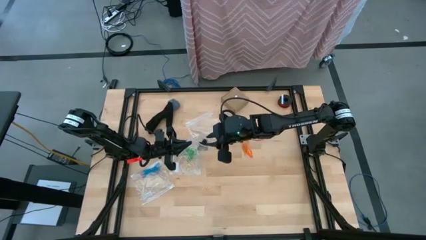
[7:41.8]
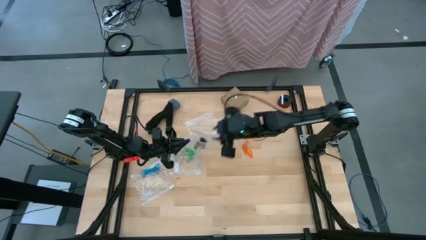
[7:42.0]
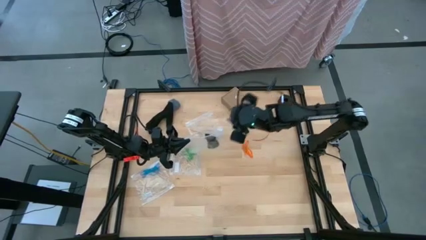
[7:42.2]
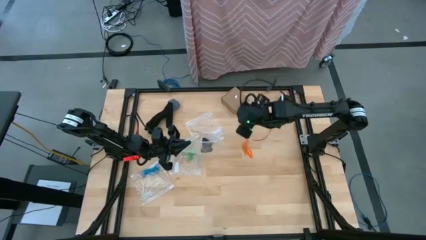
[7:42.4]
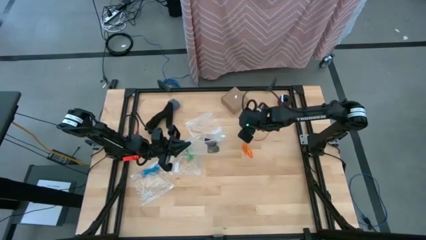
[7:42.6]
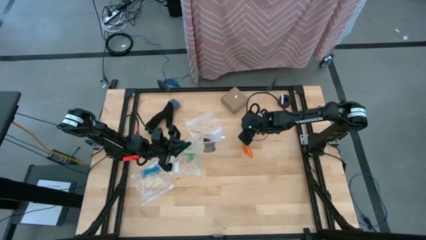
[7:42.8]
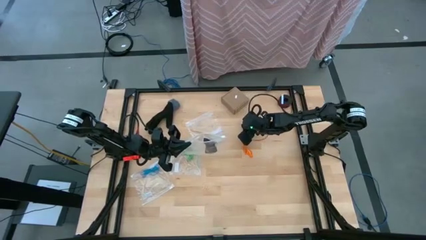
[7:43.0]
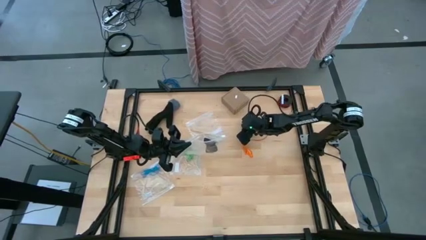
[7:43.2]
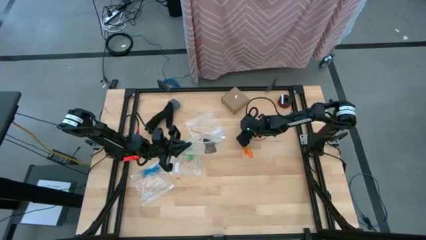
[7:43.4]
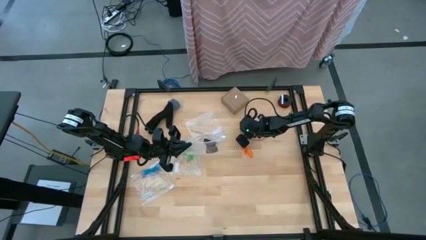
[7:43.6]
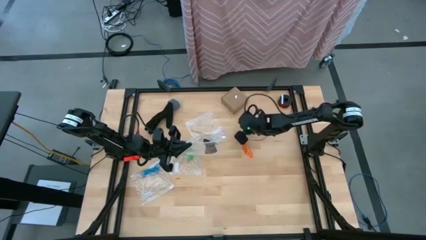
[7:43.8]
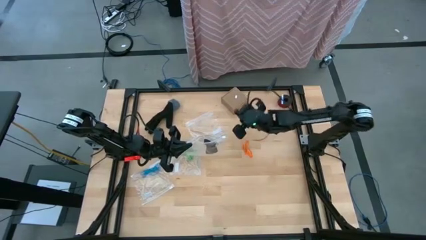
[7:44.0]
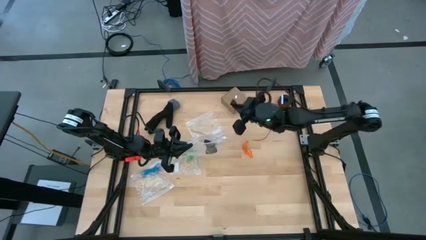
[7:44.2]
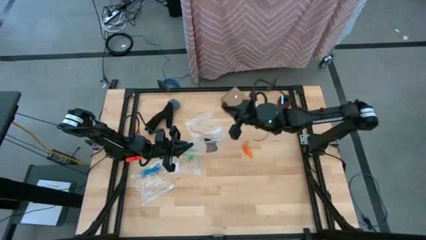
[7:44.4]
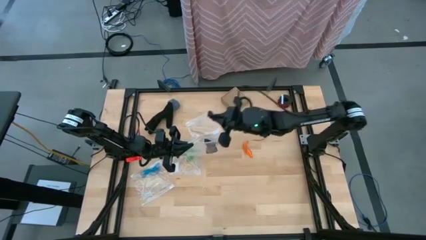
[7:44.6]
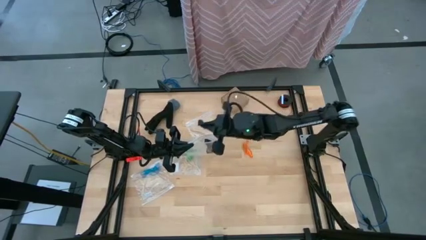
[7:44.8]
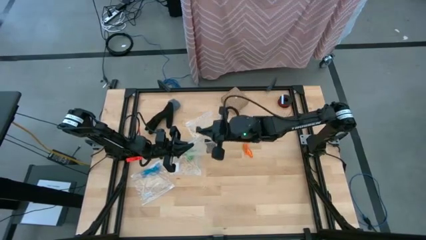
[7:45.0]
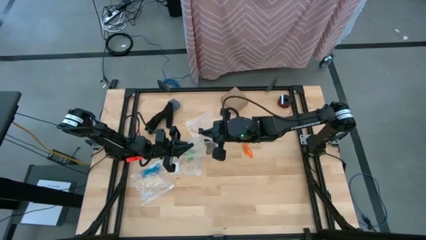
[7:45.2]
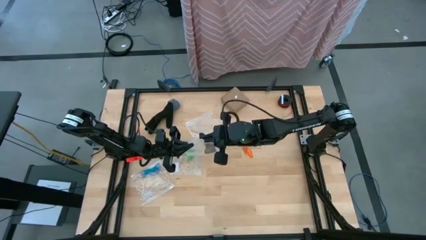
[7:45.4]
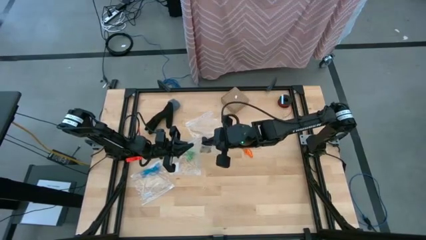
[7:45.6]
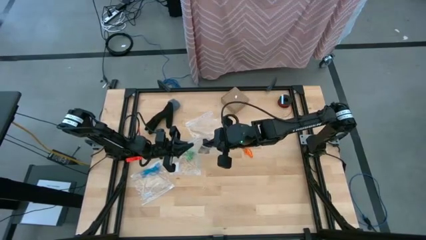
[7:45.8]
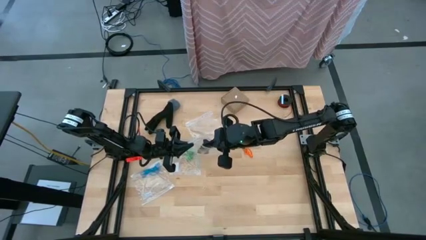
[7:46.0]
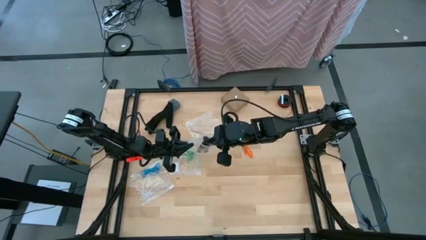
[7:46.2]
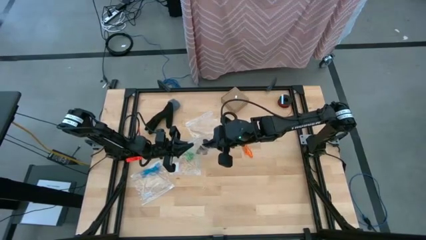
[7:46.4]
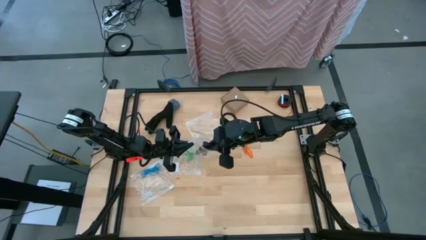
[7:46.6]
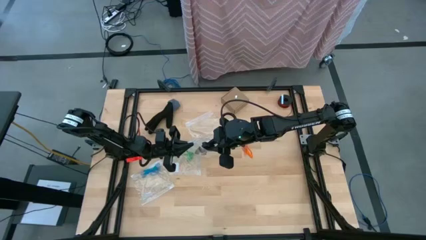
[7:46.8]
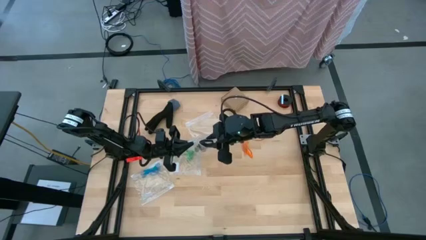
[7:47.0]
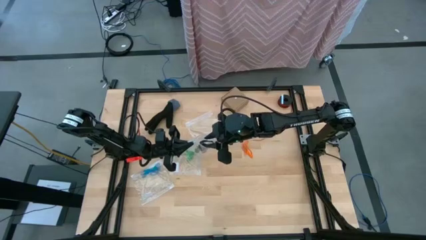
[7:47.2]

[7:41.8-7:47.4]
Task: Sort rubber bands
Put the black rubber band into the transparent zip bag

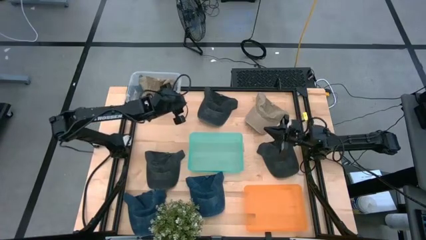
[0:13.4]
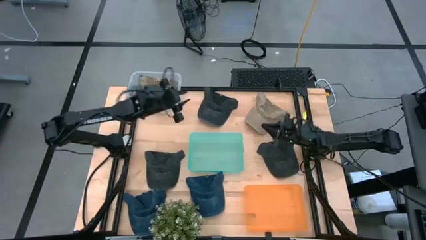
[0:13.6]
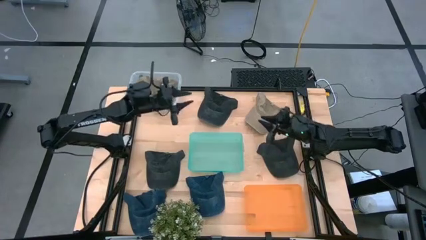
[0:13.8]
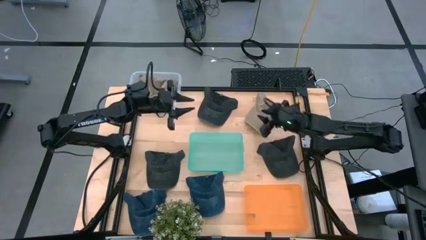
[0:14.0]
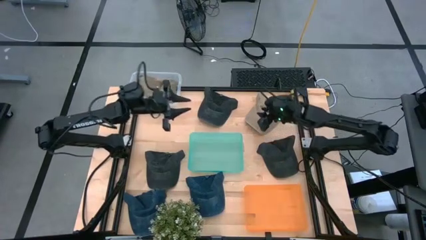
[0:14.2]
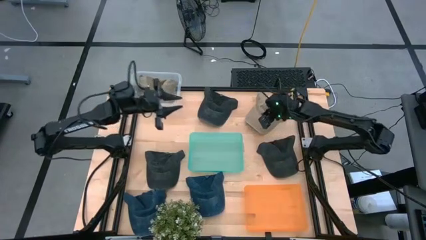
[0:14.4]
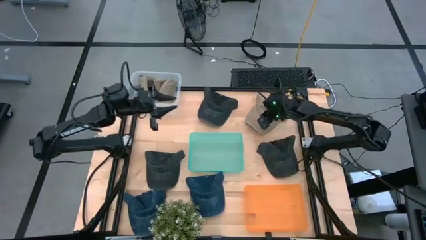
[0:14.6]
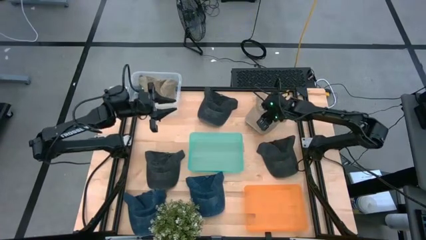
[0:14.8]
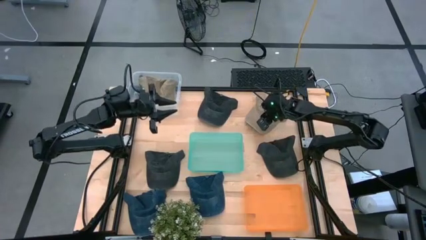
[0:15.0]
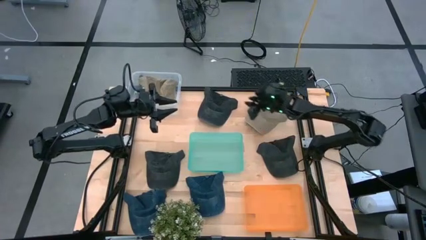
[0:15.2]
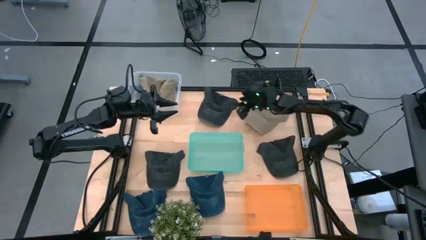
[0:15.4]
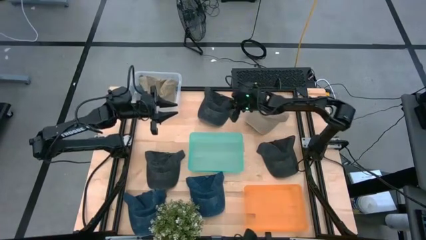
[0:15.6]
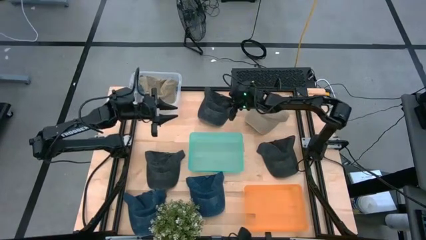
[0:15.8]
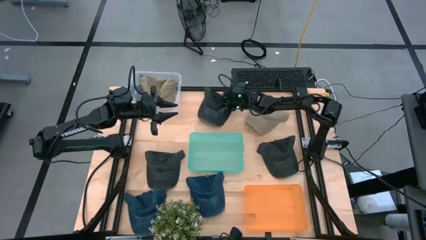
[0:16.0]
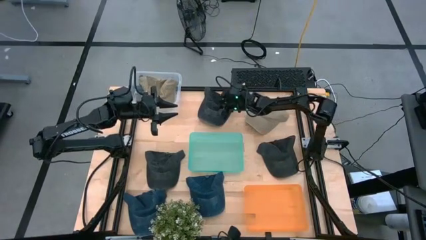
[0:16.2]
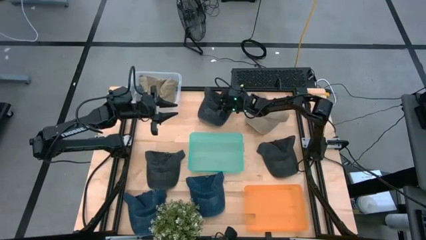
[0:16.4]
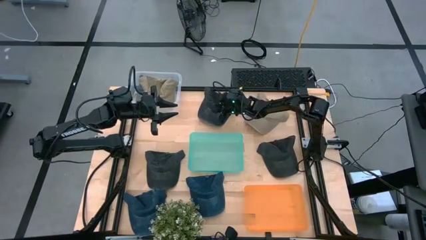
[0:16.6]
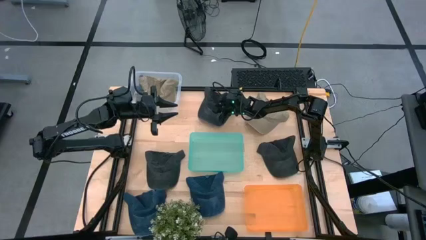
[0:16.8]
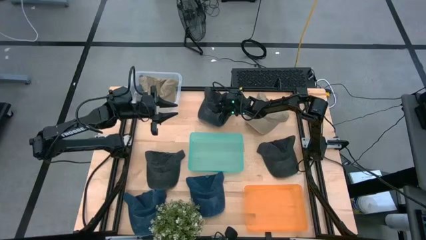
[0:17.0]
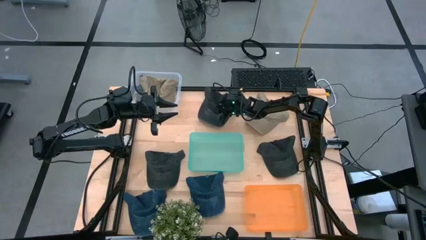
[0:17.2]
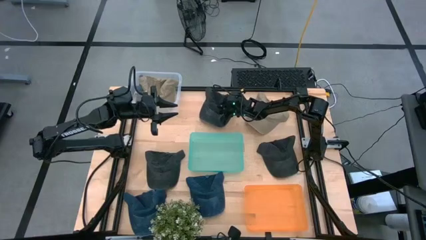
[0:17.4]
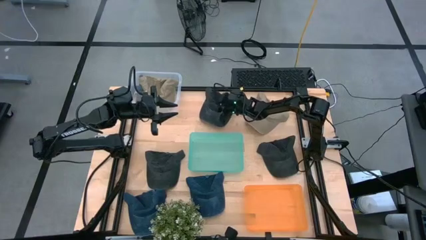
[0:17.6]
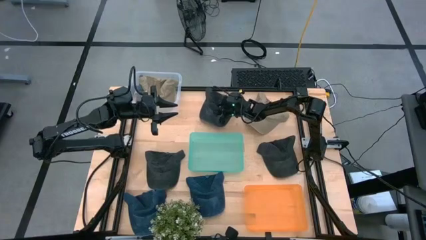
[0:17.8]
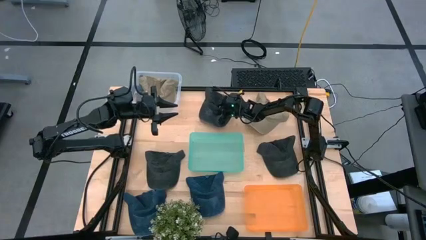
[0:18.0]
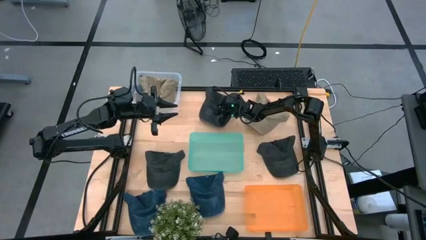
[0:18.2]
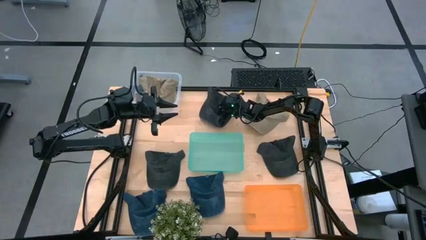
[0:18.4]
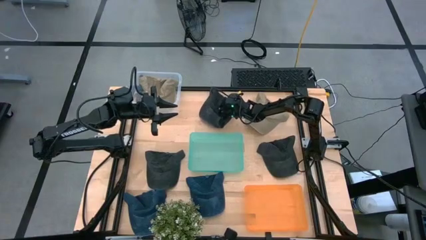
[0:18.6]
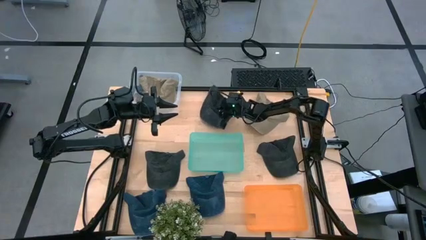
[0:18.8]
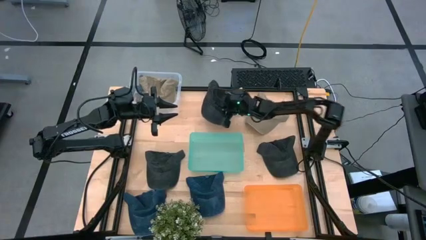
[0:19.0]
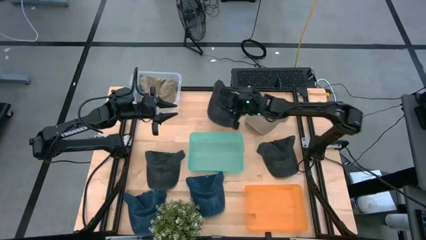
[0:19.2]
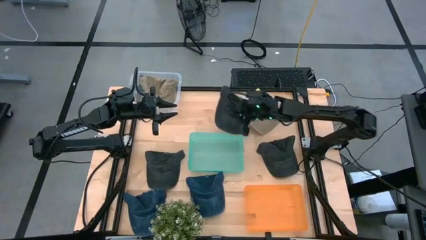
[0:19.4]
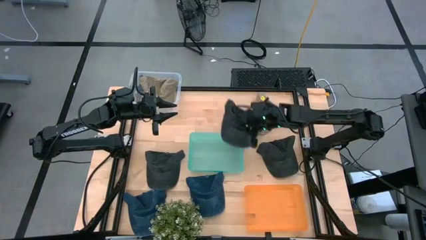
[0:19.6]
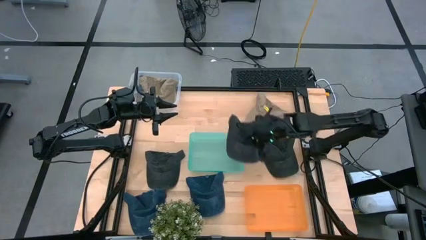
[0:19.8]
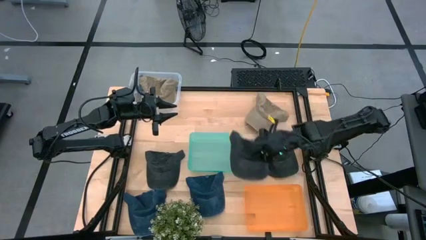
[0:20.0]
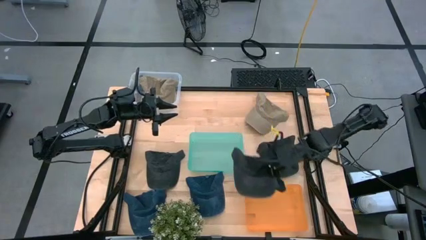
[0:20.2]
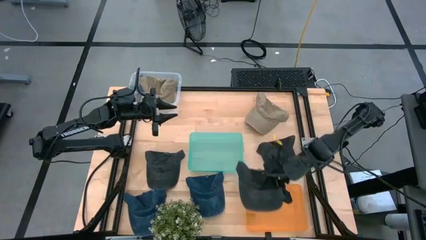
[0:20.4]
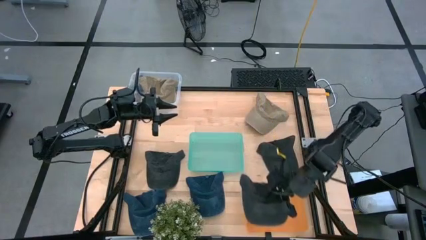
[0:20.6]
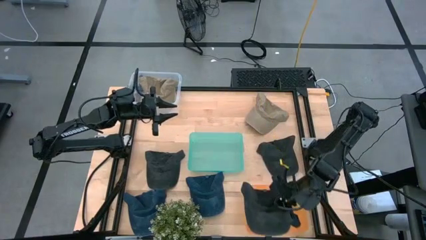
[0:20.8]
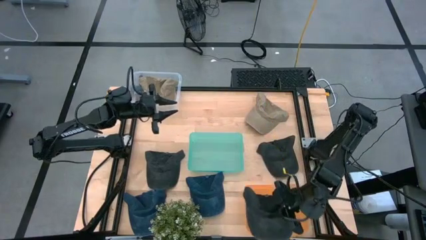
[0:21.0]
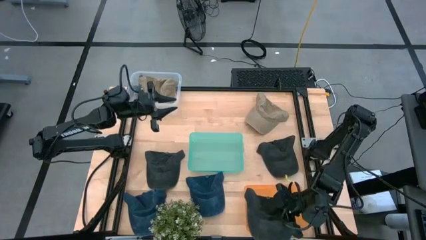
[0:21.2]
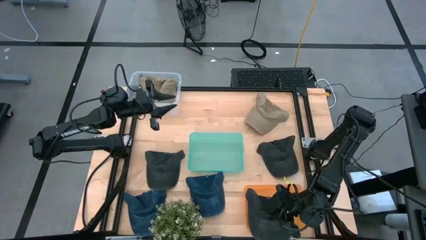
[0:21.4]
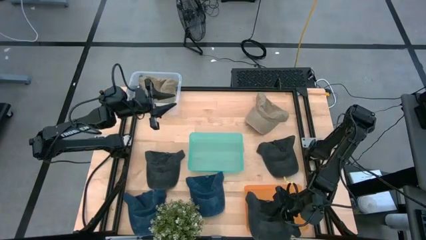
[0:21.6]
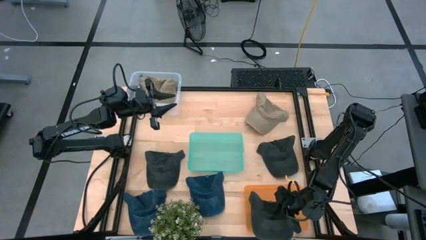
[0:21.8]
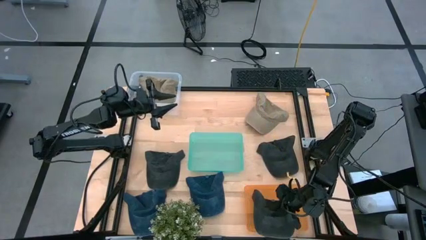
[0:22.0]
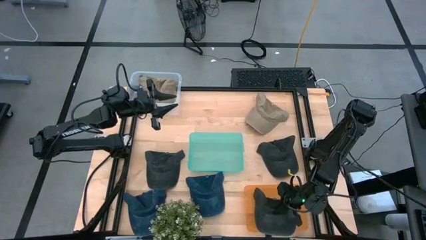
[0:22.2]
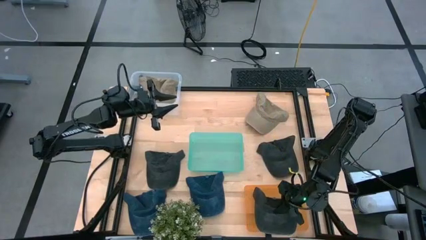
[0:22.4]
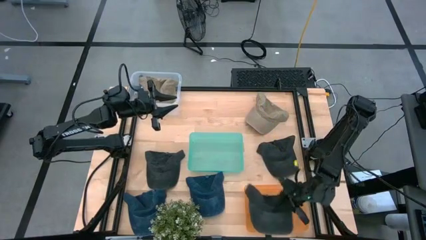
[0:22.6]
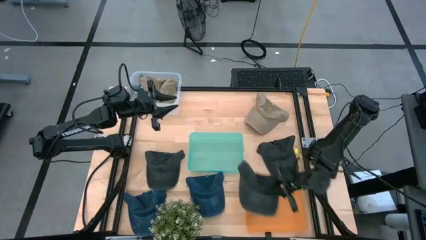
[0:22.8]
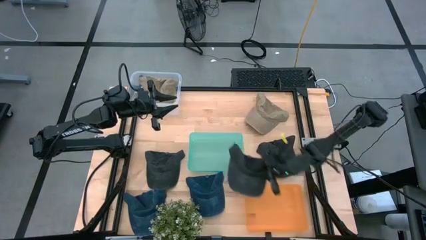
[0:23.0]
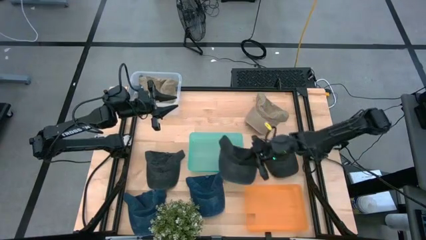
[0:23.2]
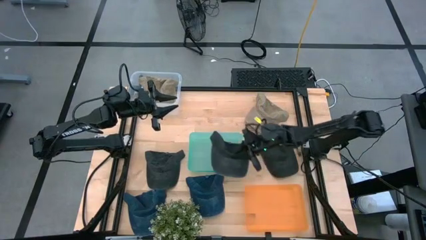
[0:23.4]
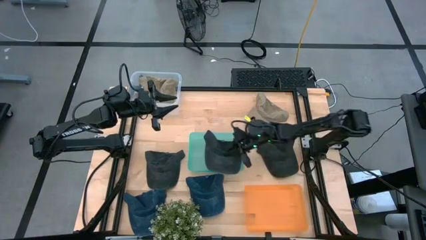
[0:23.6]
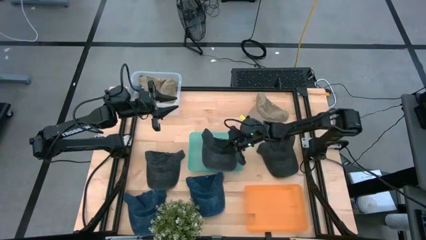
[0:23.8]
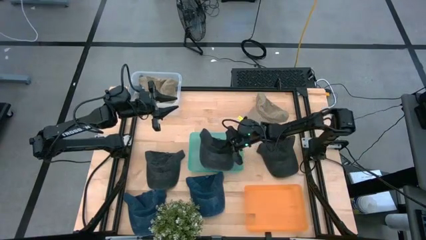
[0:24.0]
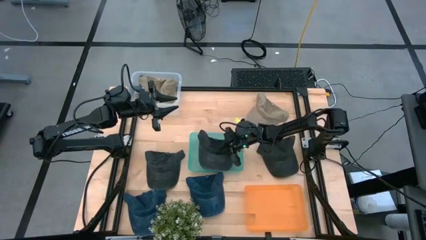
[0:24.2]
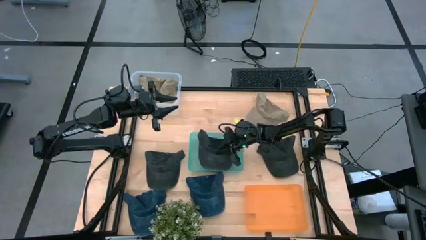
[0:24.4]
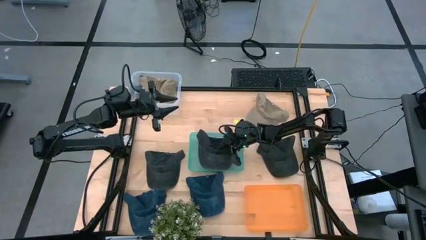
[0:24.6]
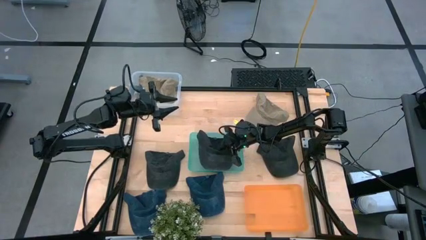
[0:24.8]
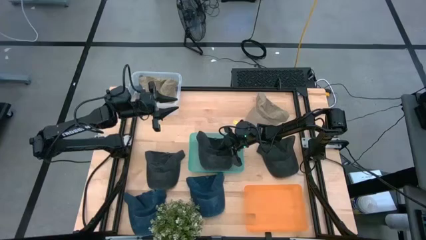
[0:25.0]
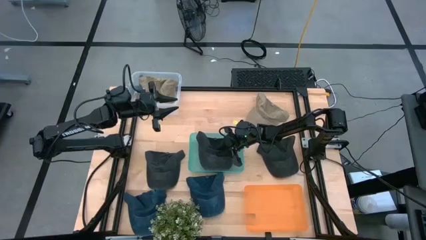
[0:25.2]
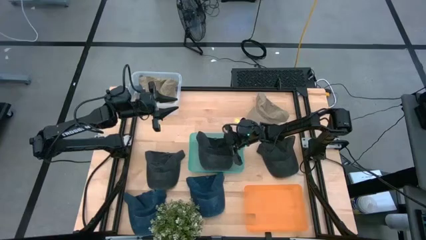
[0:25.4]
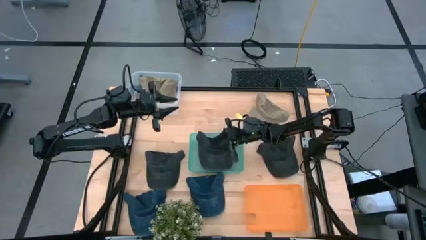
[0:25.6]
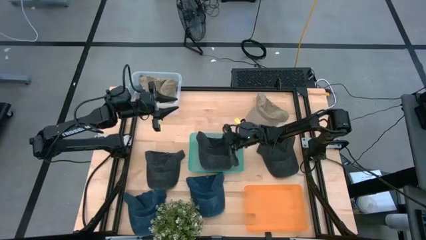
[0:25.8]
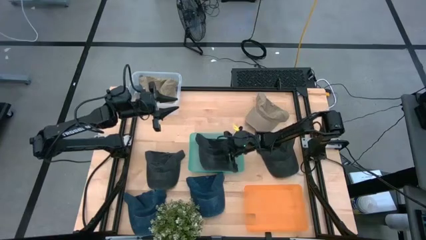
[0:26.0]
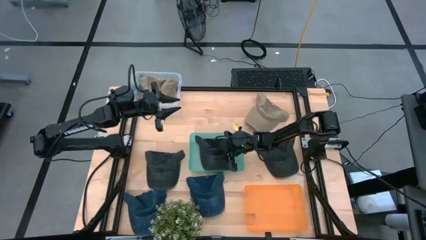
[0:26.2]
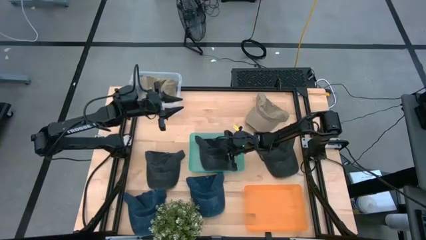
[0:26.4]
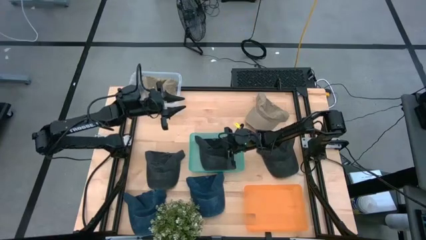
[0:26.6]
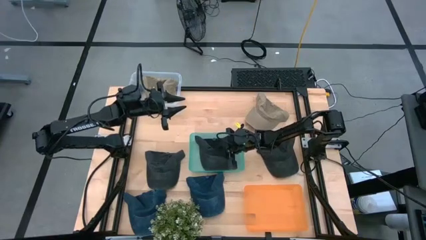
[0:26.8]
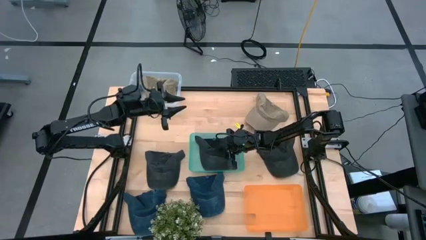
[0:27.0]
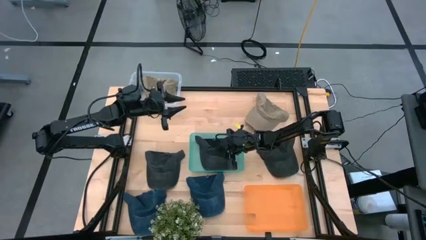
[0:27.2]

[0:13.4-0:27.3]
Task: Pick & Place hat
Put the top black cap into the green bin
